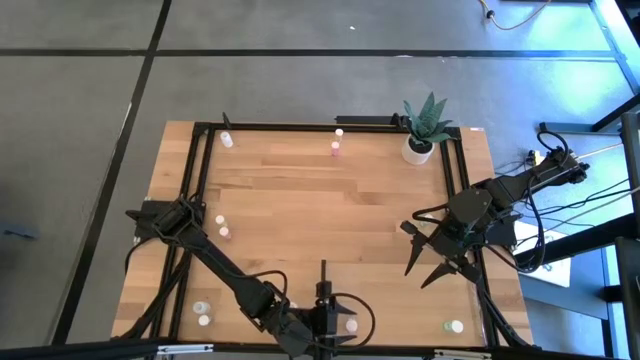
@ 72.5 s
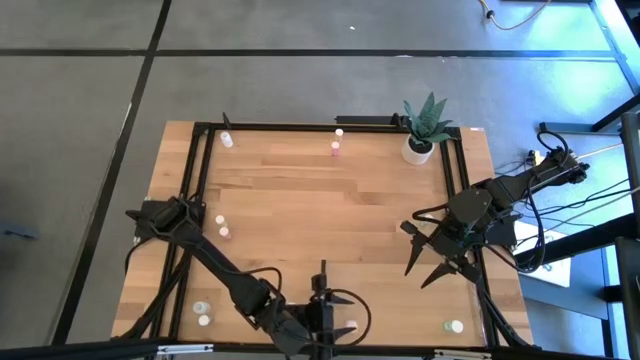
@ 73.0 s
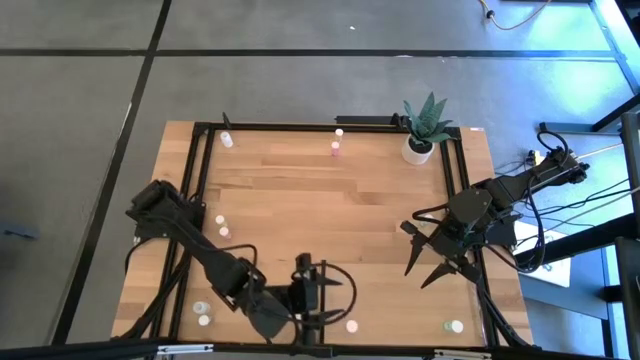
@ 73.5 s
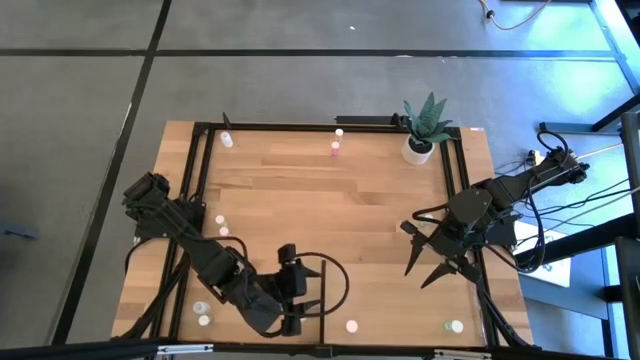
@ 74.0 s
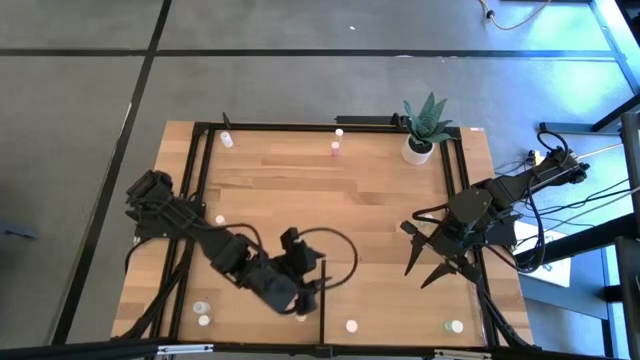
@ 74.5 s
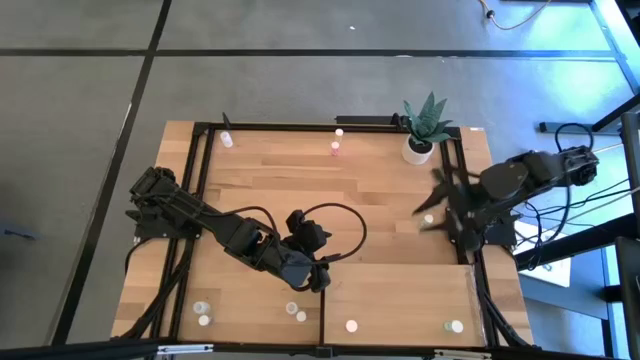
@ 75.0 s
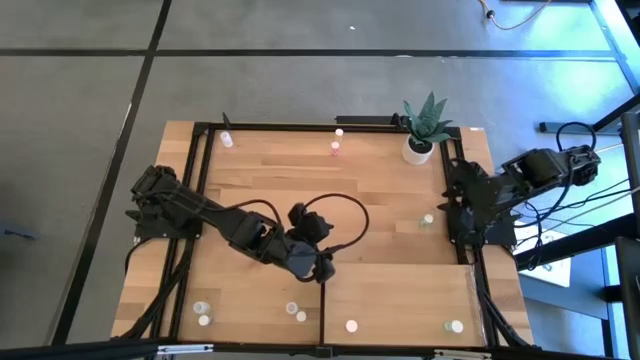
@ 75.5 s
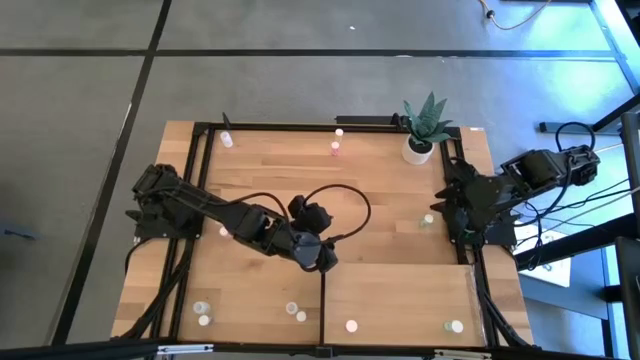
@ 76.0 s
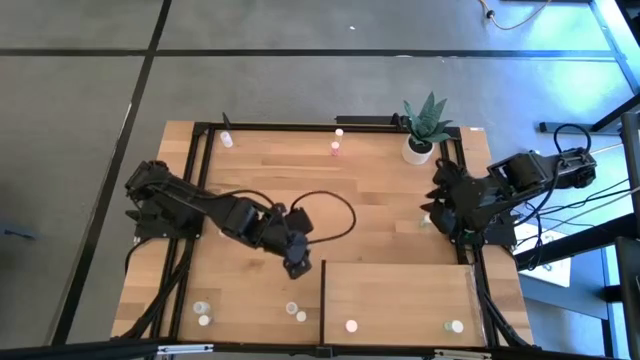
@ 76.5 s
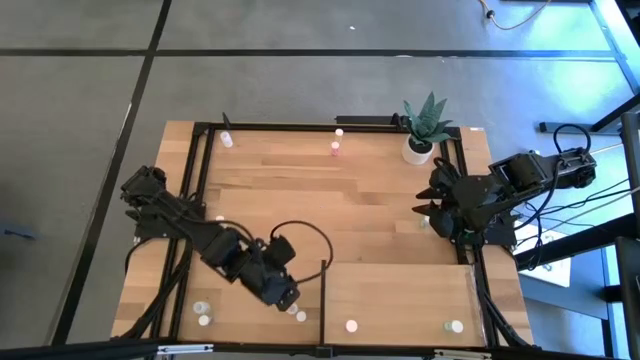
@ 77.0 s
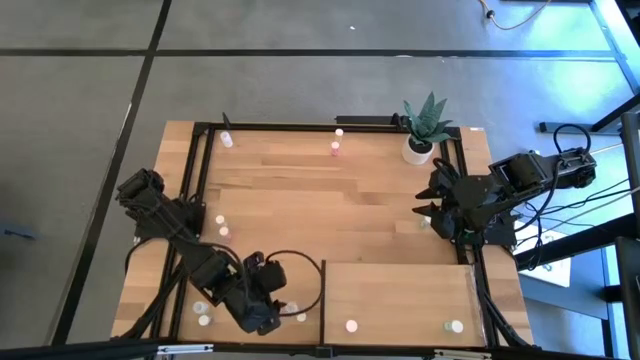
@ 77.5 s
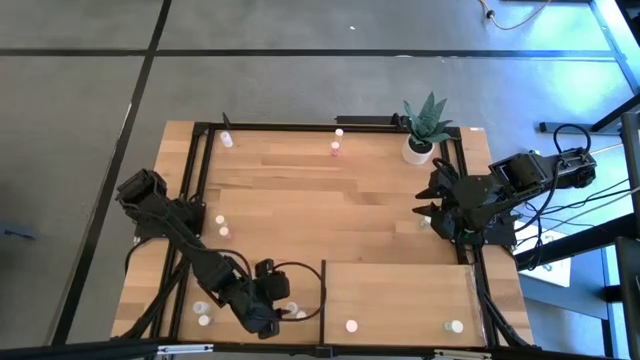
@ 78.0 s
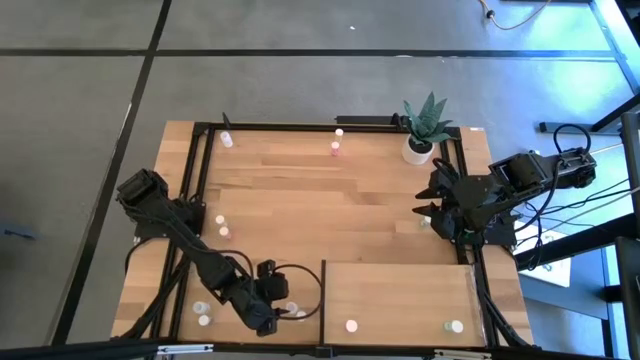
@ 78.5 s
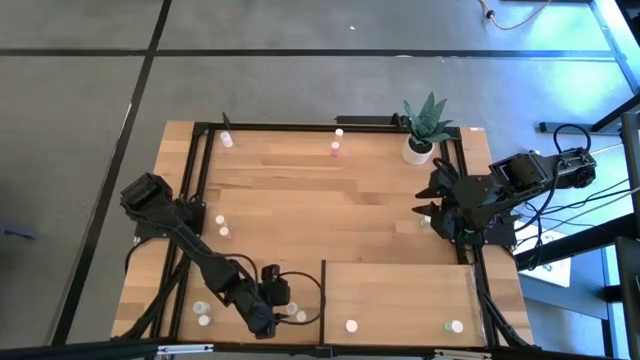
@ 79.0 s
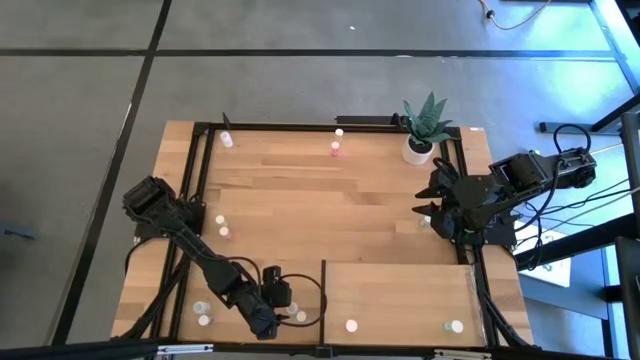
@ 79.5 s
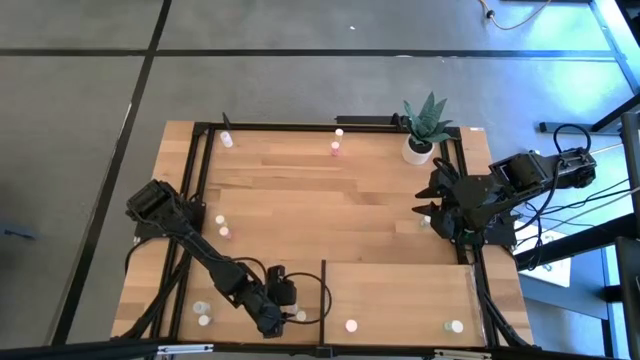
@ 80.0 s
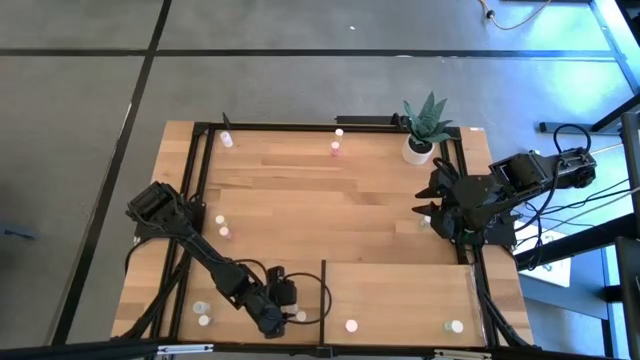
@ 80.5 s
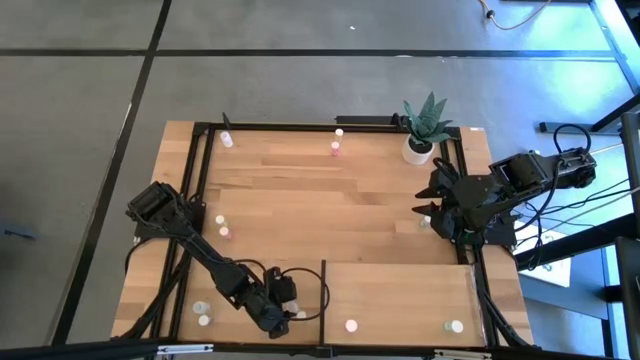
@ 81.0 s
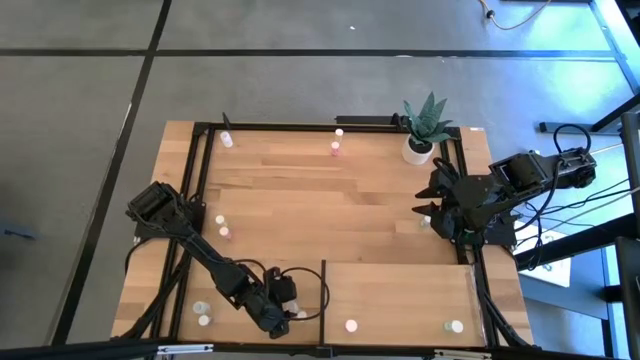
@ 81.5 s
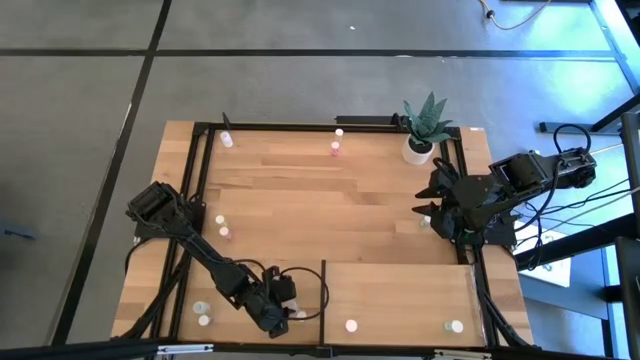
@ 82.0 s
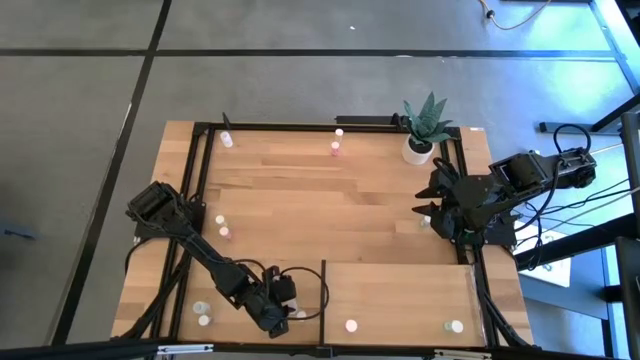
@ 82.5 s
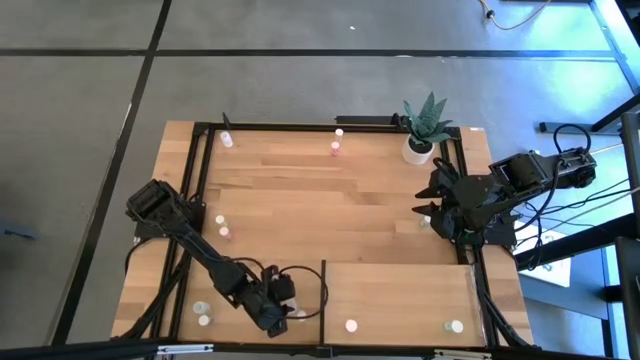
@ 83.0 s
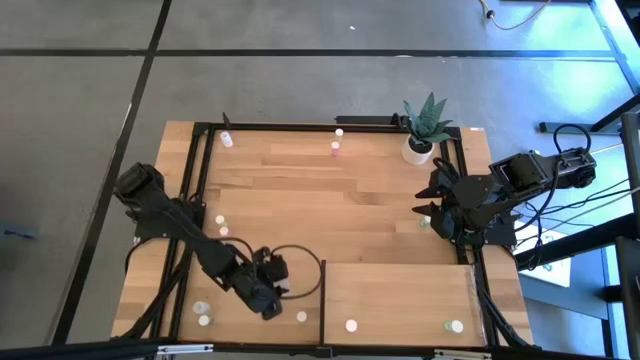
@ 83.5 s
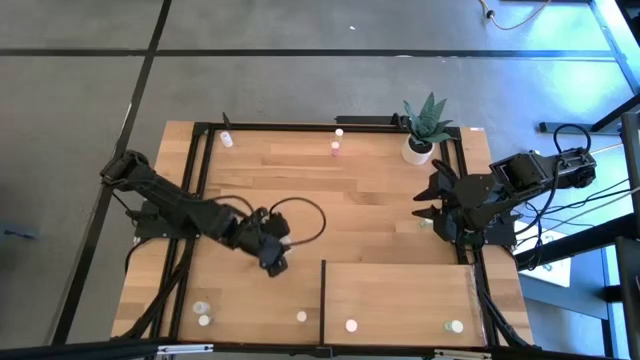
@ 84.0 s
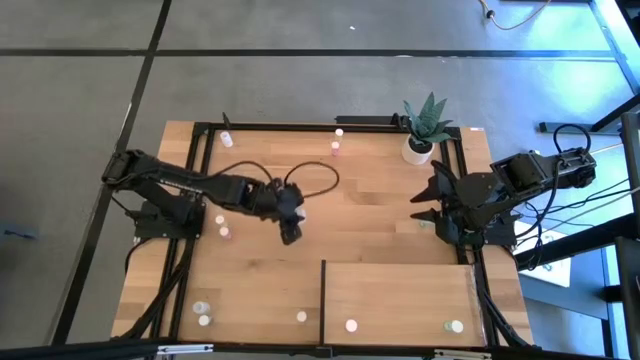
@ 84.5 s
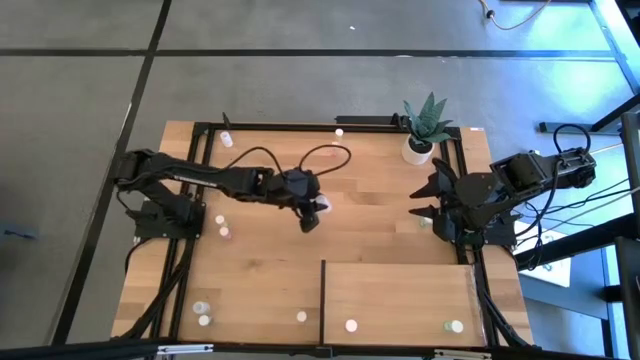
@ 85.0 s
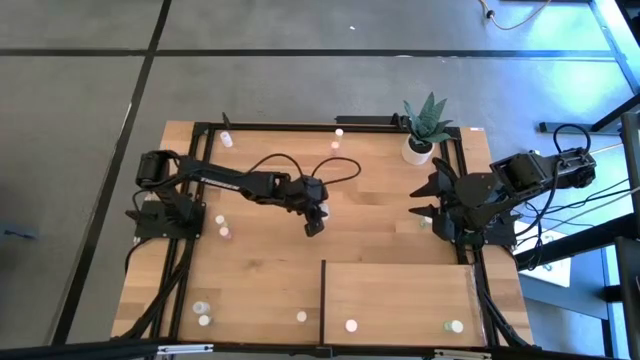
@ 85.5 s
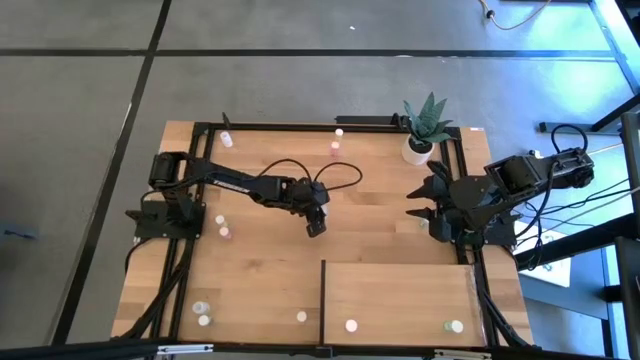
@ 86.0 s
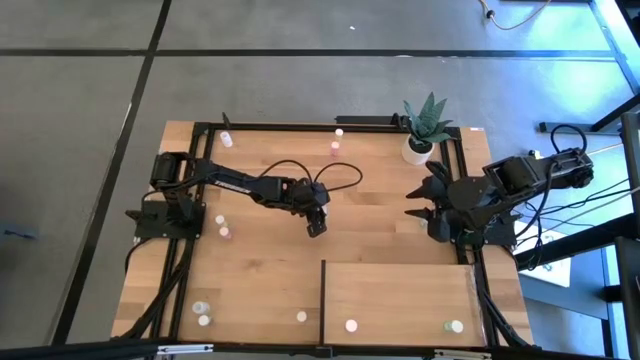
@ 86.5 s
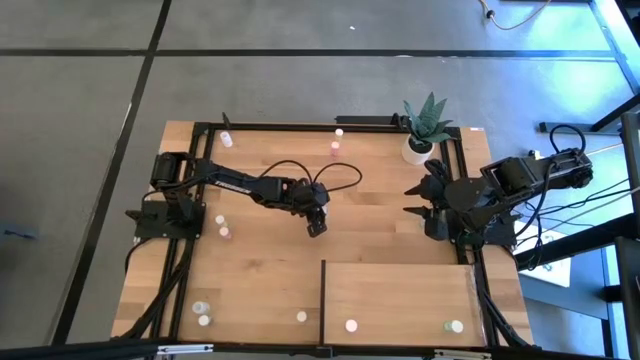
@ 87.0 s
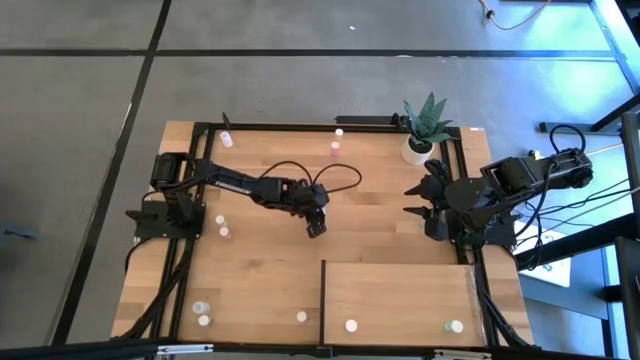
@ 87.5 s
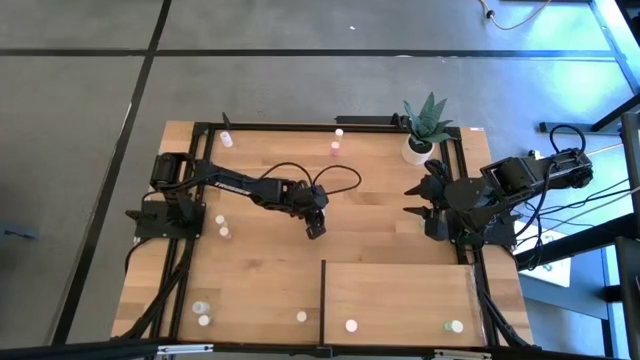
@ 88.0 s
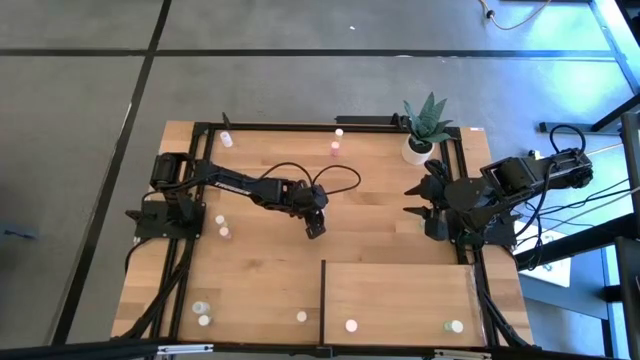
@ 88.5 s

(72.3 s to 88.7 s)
Task: Pick and place medicine bottles onto shelf by color
Put the bottom right transparent pill bottle on the shelf

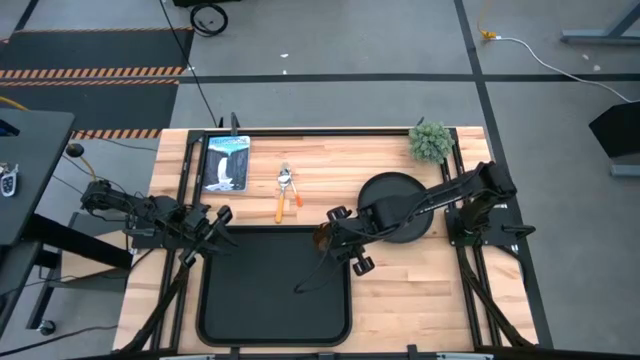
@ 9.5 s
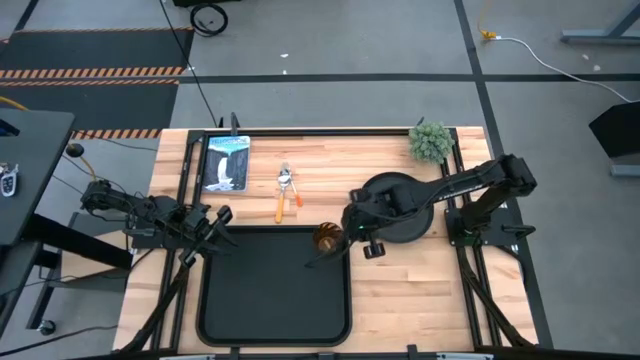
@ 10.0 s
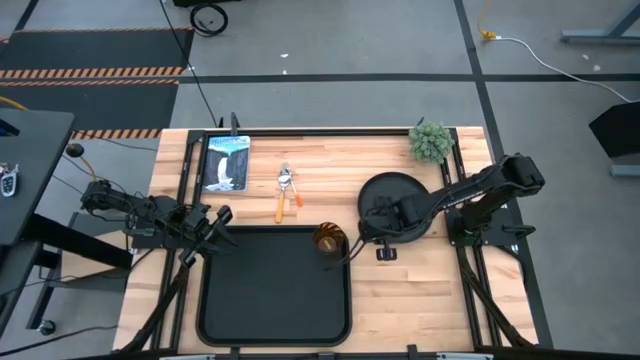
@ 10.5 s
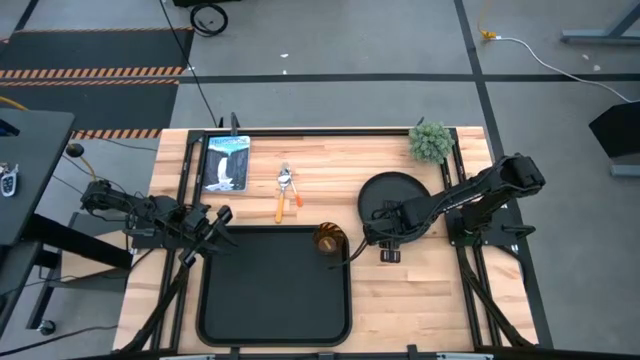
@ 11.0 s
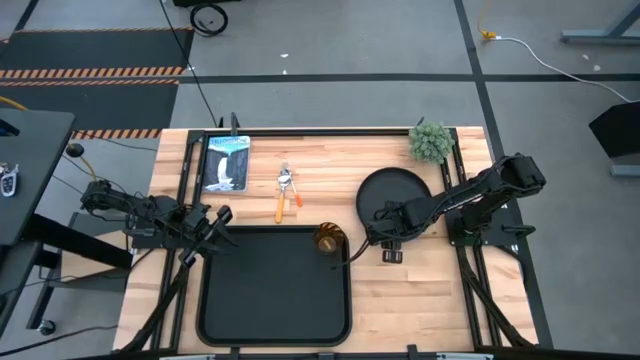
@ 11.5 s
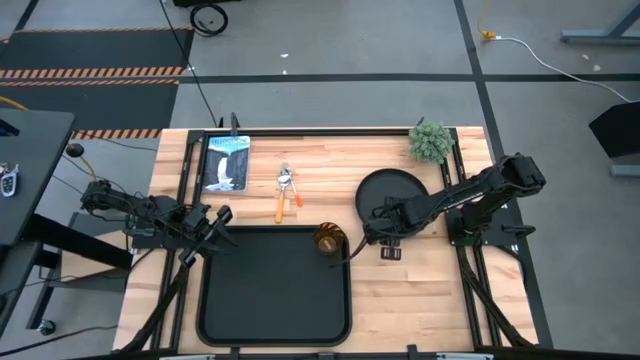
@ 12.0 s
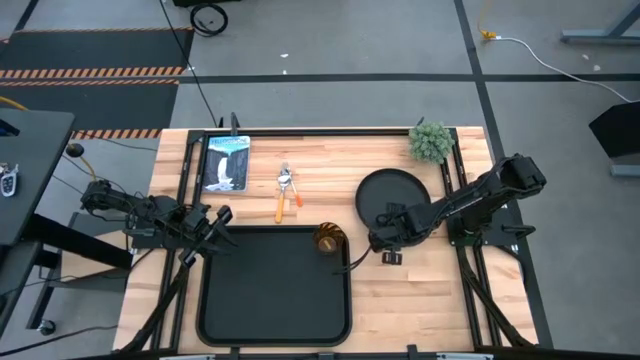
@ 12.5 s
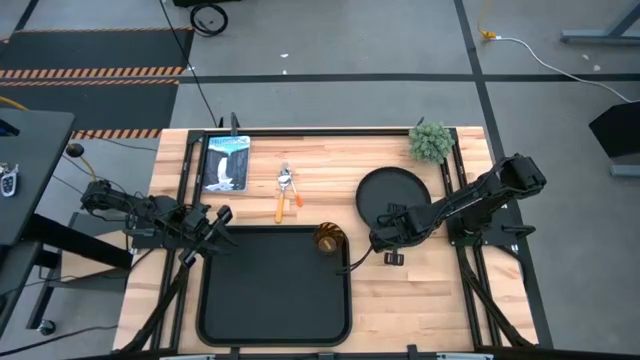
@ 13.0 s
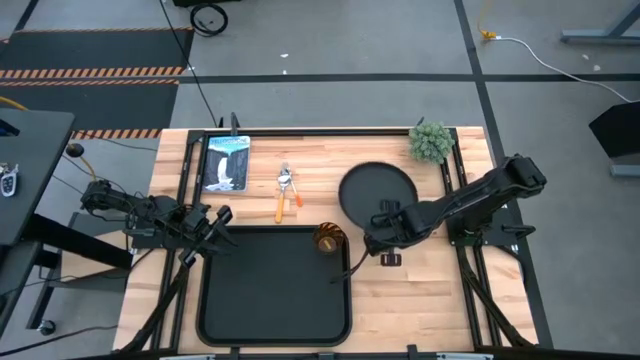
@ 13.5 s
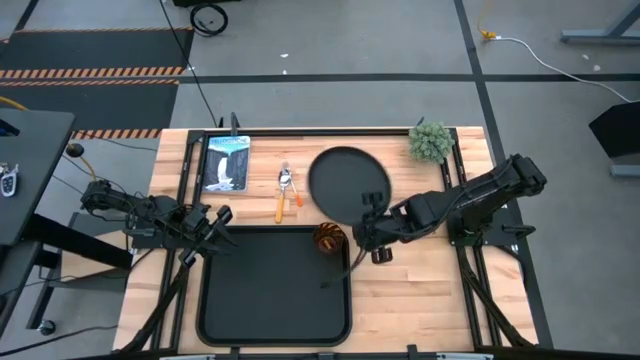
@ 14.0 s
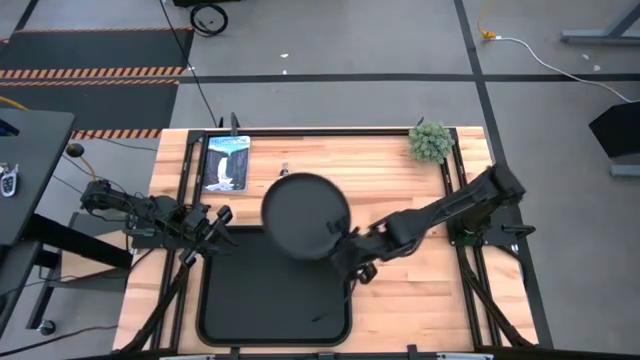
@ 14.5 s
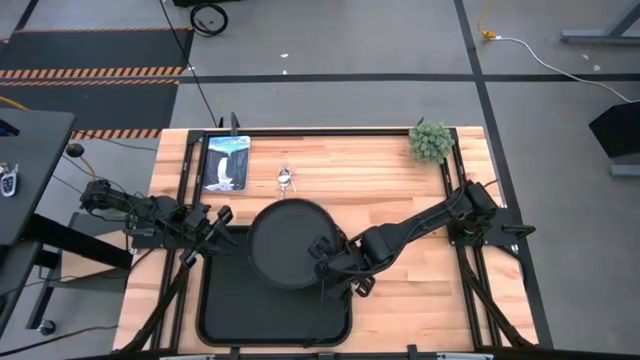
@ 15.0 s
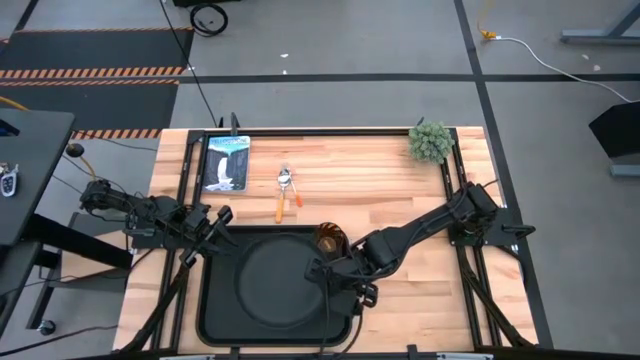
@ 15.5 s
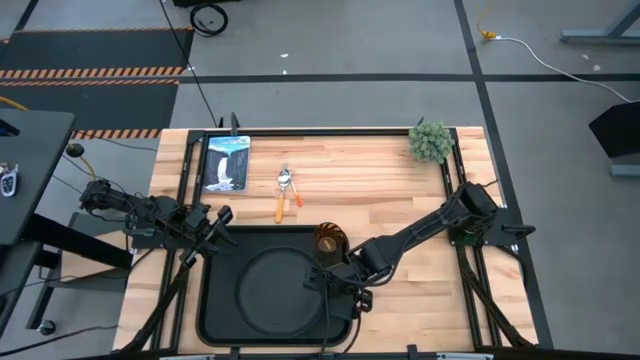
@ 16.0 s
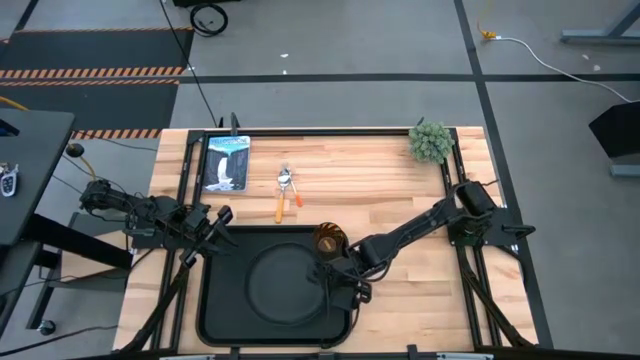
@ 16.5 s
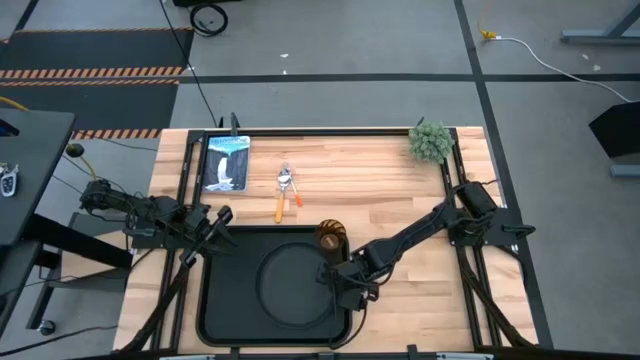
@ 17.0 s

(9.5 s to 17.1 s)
Task: Pick and place plate/cup/fork/spoon on tray
Put the black plate below the orange cup on the black serving tray
